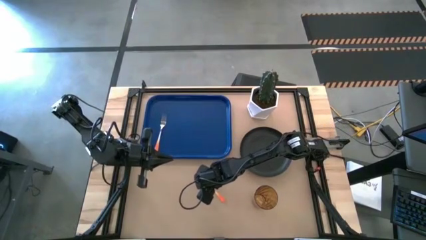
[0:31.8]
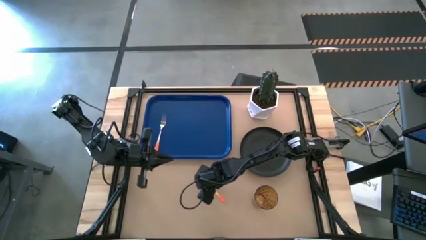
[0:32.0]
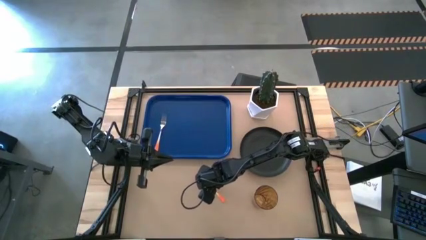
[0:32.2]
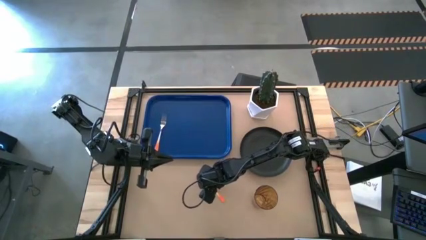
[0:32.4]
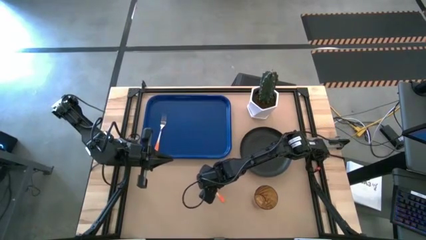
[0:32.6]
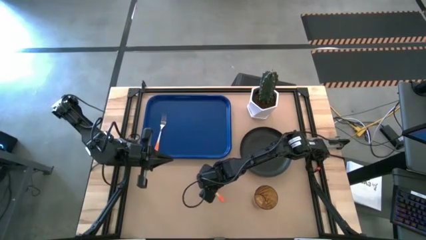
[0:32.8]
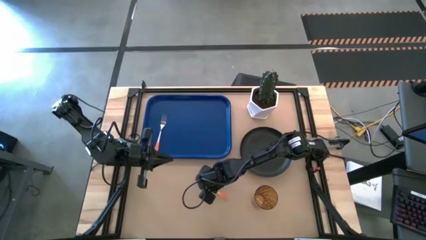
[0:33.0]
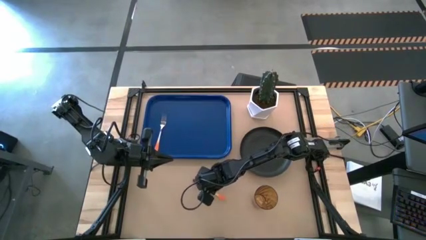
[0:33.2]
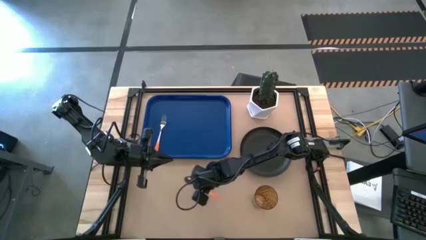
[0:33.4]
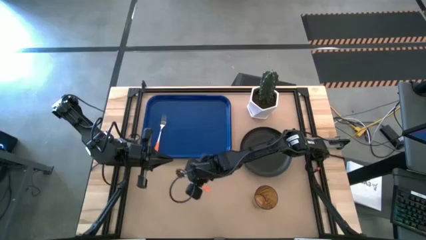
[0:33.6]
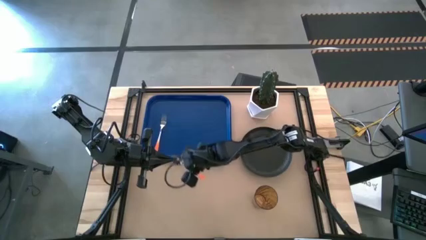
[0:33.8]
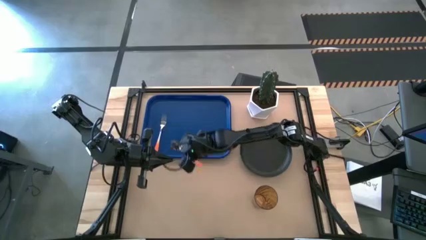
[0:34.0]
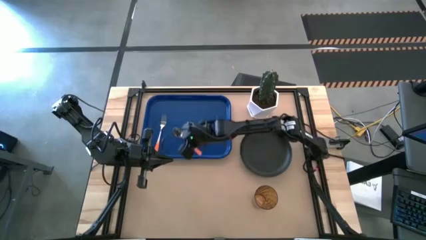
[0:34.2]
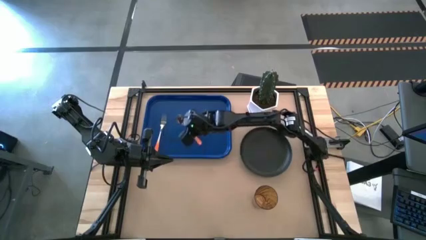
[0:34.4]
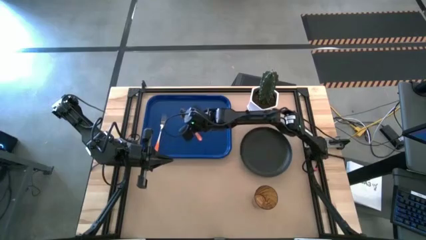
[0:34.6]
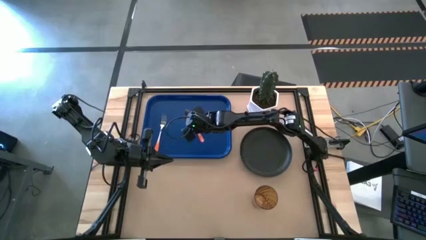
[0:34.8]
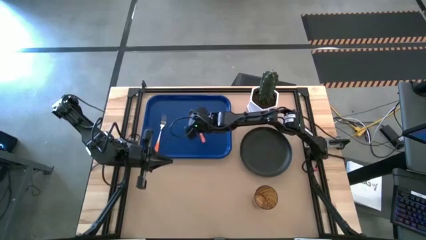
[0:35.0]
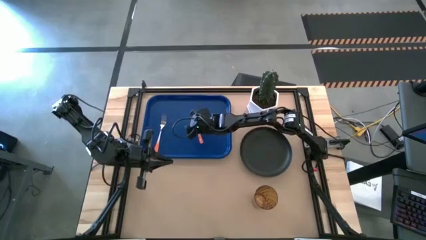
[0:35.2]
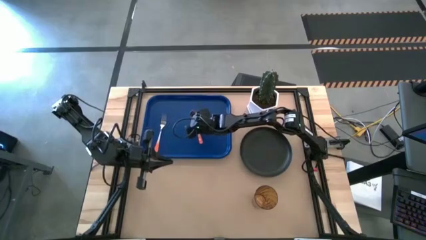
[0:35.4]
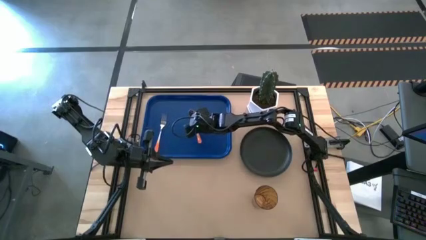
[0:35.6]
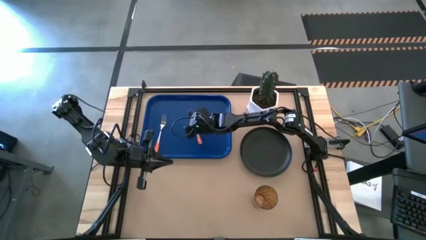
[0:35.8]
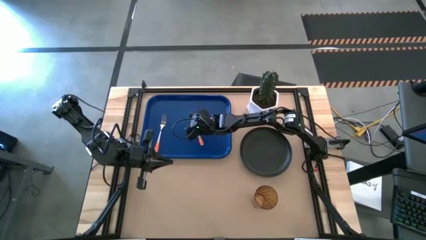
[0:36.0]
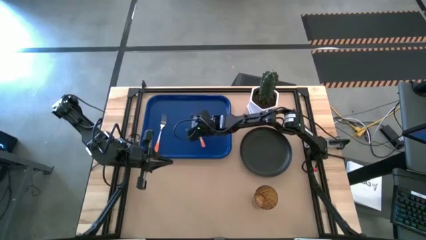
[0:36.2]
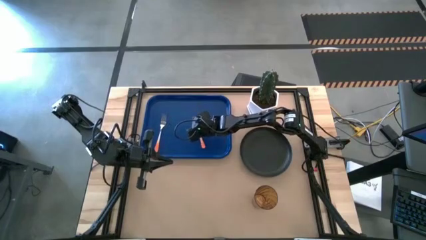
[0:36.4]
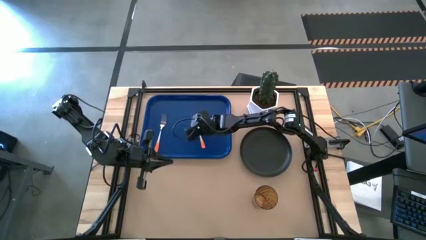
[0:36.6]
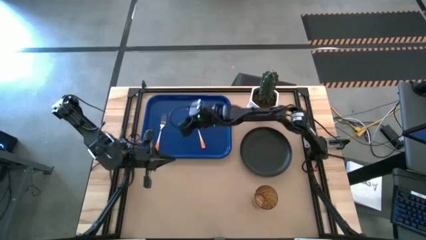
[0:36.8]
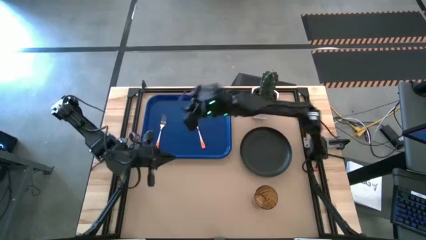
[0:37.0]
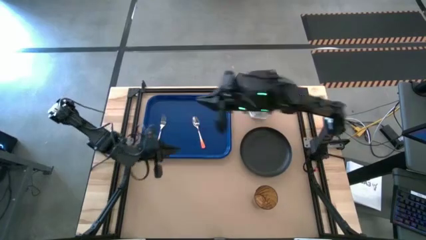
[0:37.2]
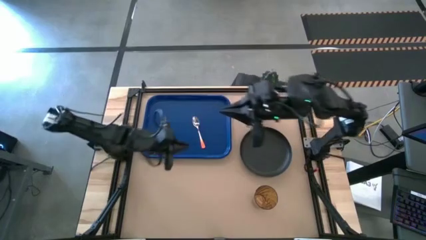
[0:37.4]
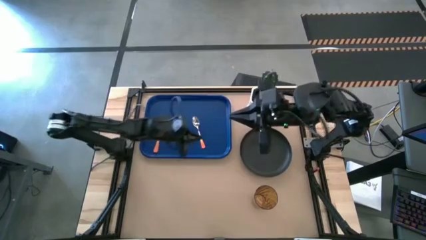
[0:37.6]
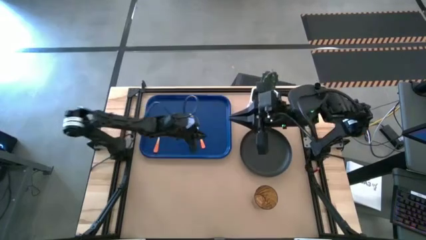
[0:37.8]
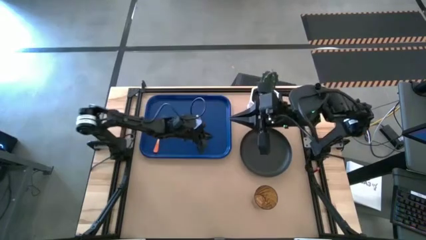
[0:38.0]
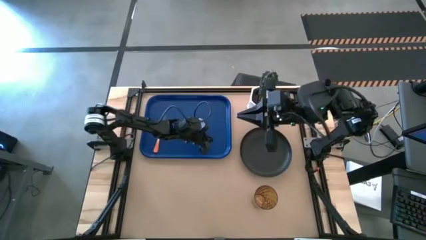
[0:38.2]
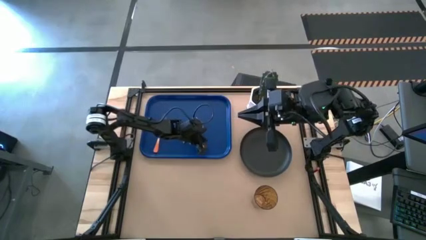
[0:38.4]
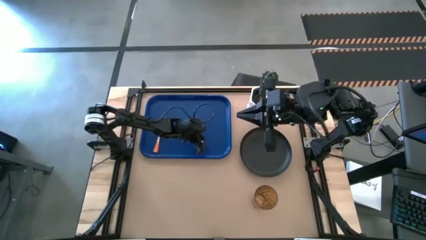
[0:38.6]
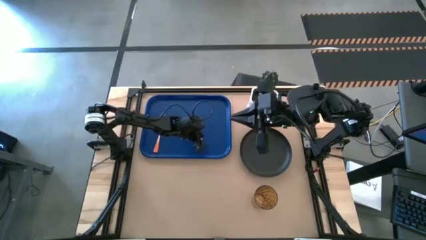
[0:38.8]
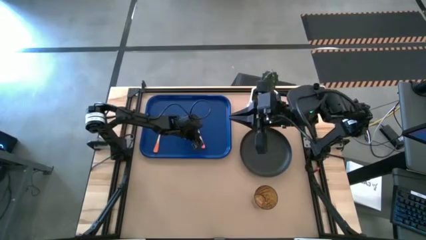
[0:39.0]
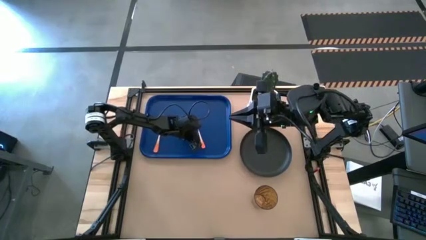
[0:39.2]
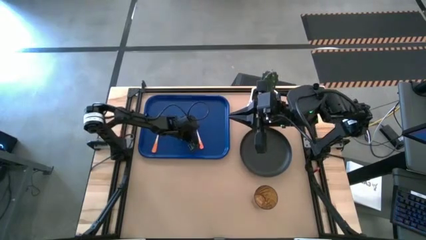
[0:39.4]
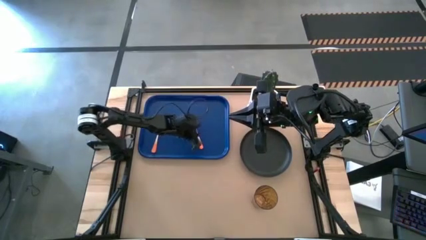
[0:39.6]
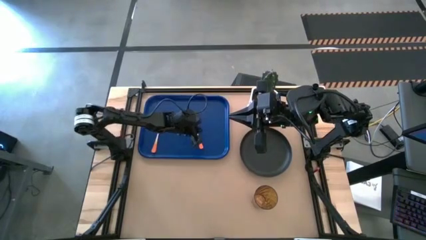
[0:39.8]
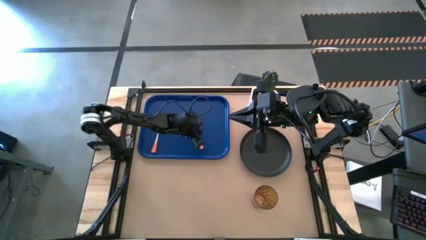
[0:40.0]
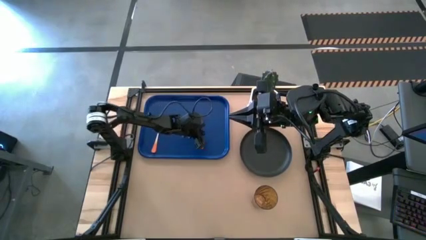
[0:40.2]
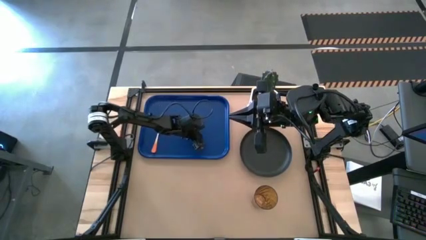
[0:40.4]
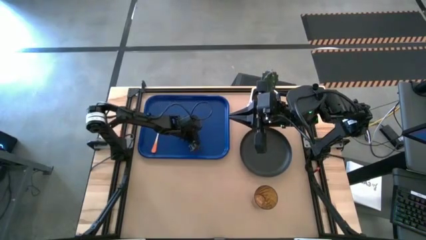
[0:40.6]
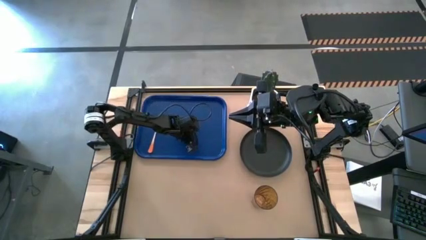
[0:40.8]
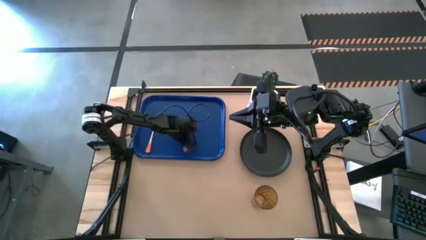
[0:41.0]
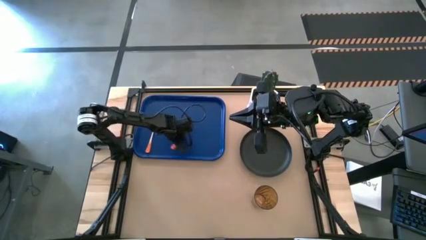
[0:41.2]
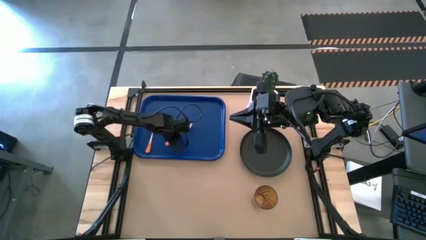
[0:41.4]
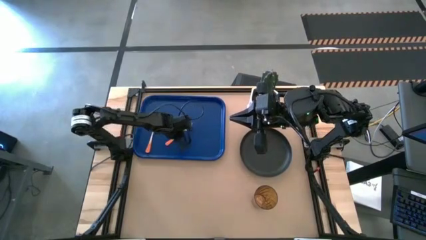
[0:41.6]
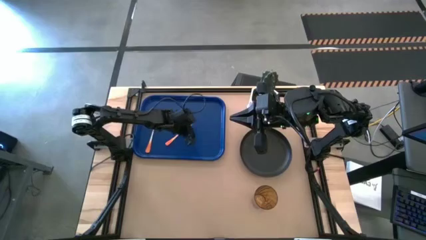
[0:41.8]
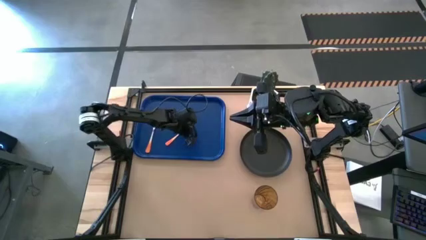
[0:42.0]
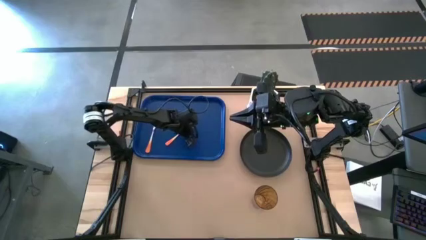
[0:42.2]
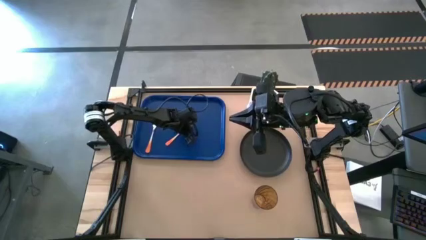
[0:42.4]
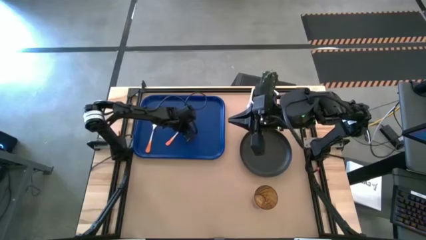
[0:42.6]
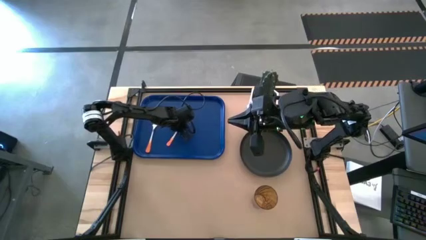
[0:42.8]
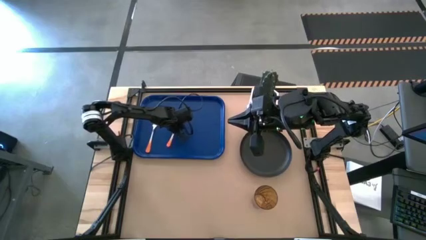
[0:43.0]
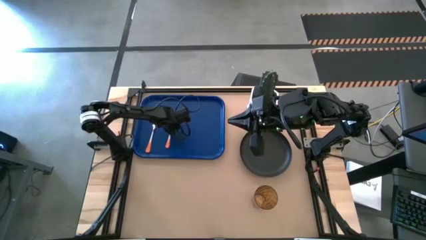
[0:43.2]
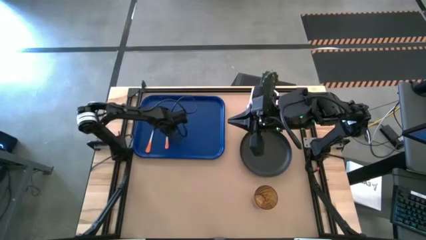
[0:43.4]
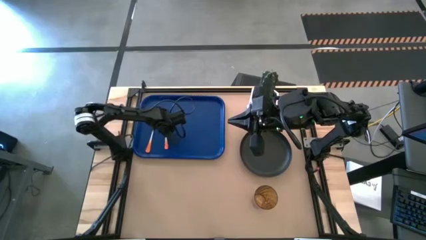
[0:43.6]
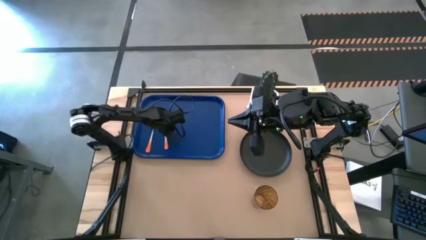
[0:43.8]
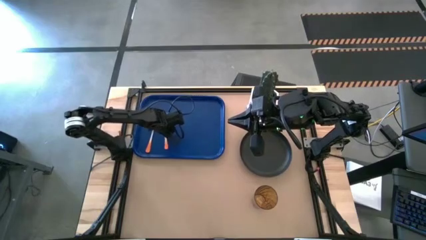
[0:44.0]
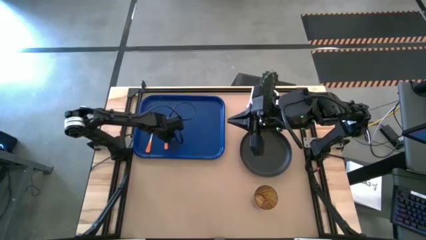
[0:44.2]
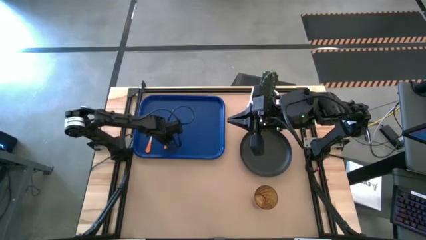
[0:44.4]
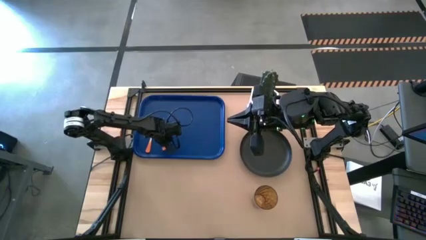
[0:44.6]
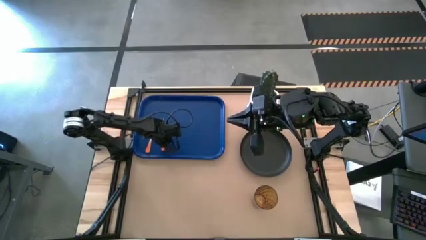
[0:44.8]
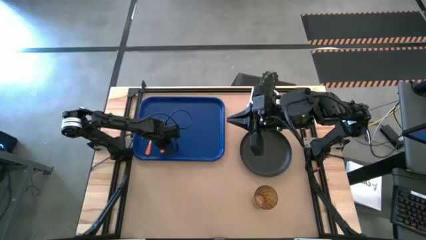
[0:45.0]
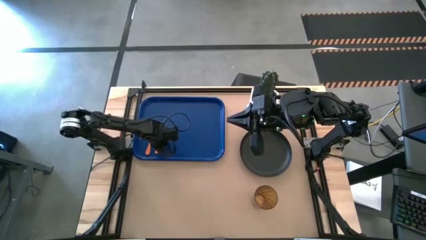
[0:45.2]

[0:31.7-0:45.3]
Task: Pick and place plate/cup/fork/spoon on tray
Put the orange spoon on the blue tray on the right of the orange fork

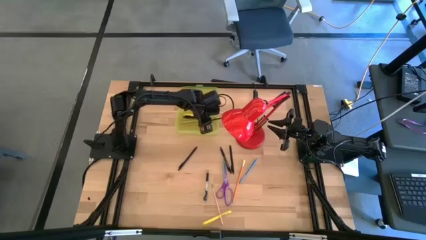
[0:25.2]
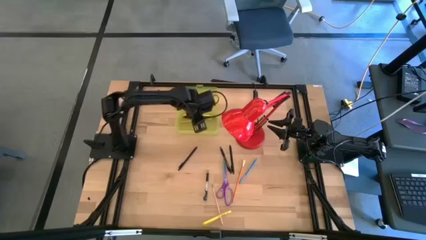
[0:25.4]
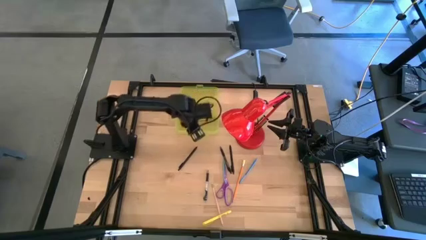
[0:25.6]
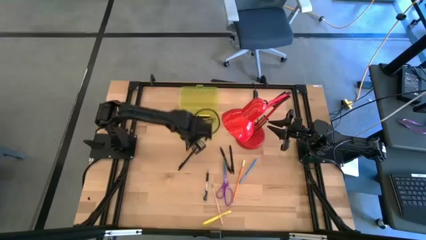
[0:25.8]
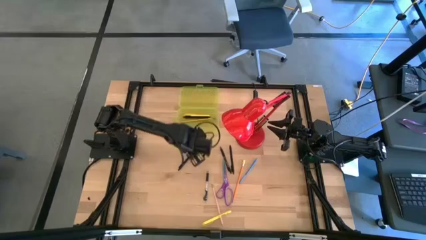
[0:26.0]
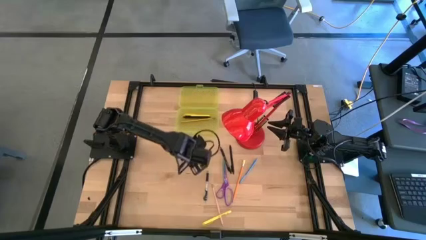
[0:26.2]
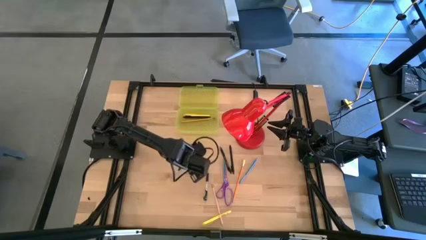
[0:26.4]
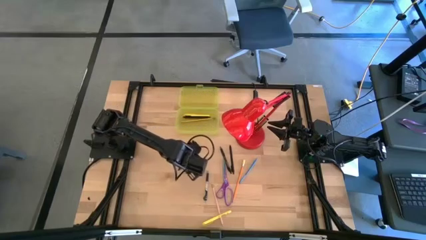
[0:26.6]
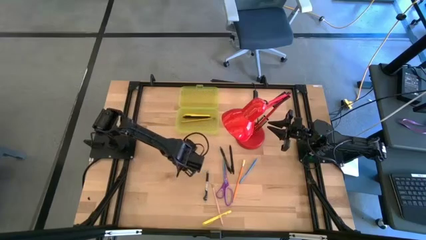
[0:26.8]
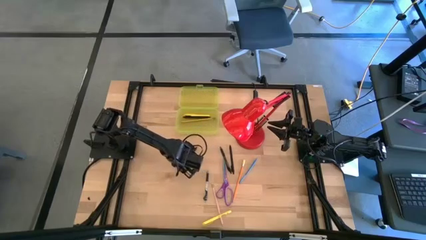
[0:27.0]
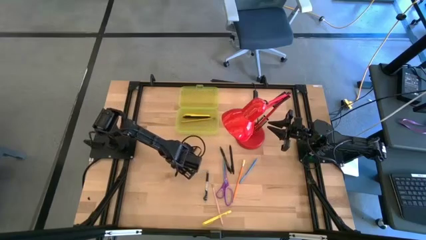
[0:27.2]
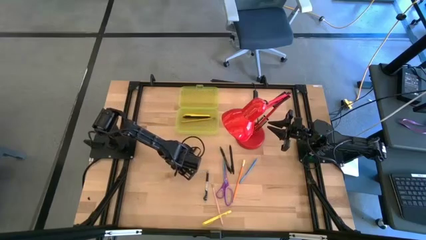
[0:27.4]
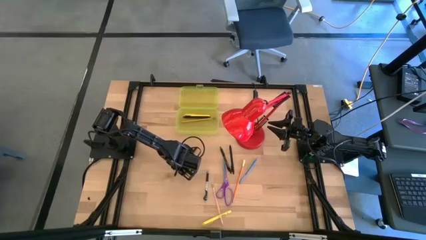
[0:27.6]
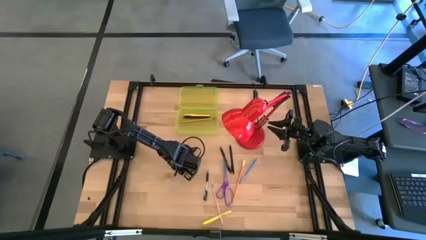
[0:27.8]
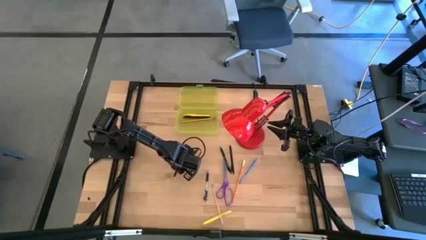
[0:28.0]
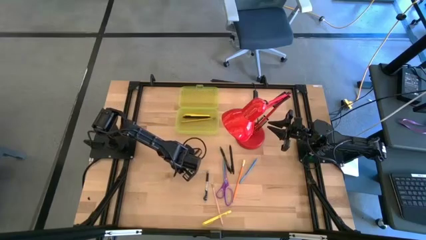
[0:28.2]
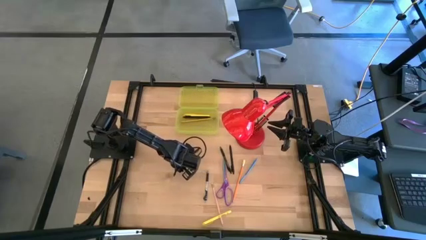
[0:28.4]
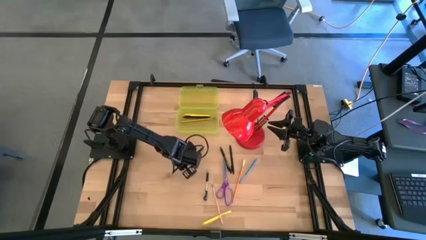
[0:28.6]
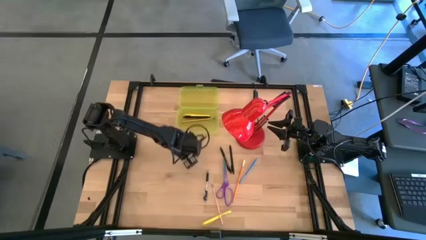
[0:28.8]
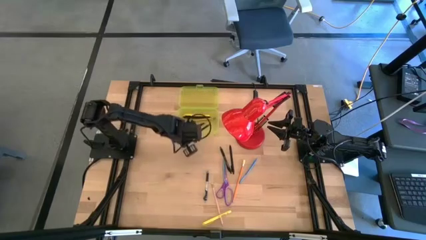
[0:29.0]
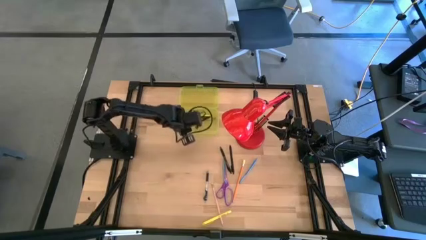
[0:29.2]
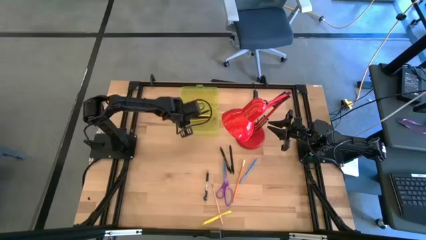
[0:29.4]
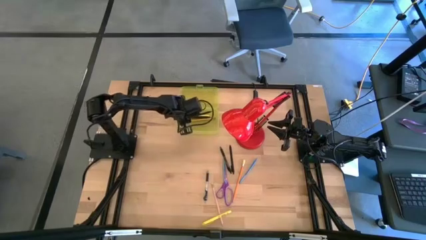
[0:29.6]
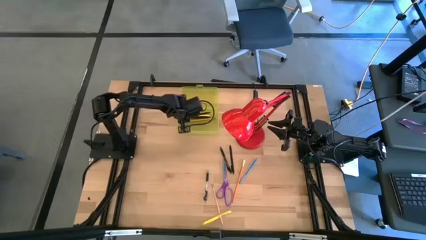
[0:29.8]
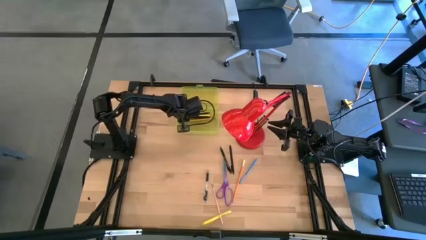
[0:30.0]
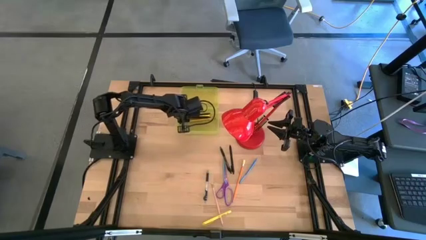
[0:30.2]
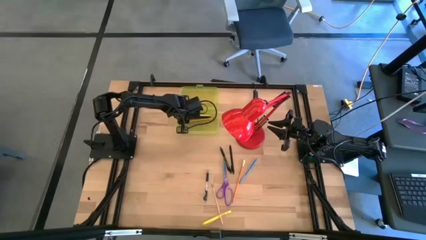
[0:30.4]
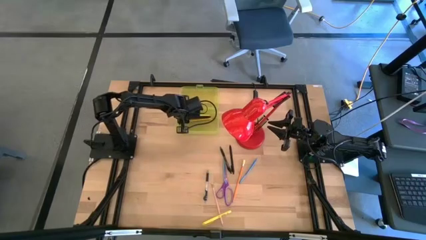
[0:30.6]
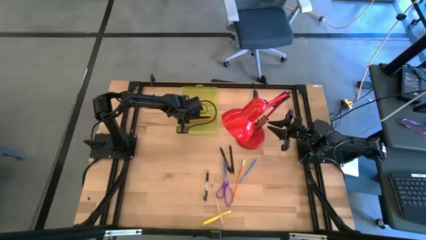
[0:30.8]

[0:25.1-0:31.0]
Task: Pick & place school supplies into a supply box
Put the left black pen into the yellow supply box
